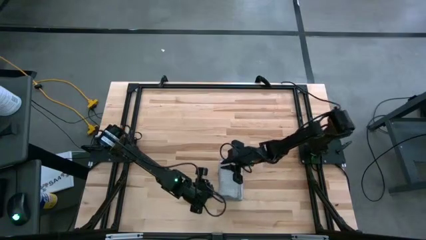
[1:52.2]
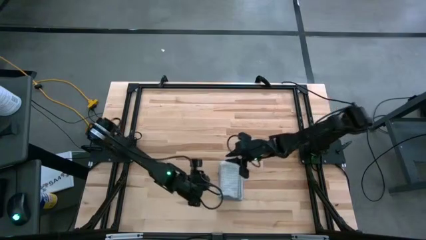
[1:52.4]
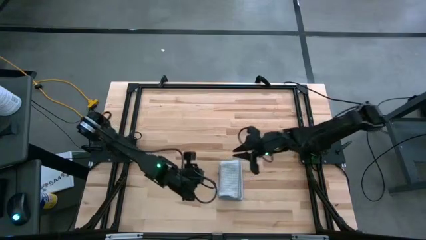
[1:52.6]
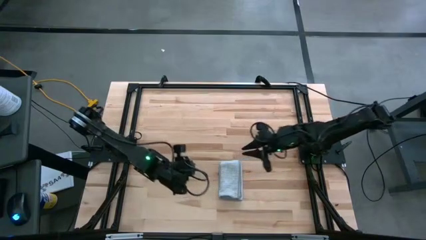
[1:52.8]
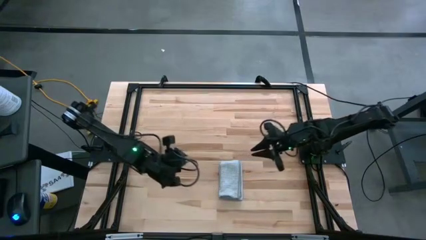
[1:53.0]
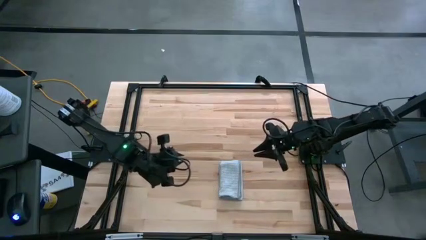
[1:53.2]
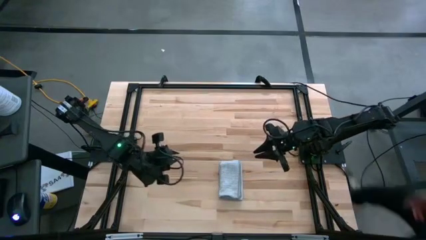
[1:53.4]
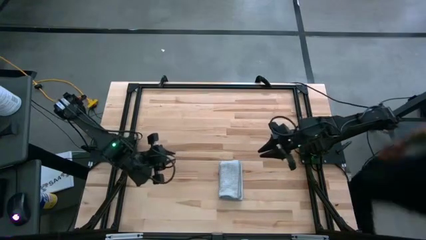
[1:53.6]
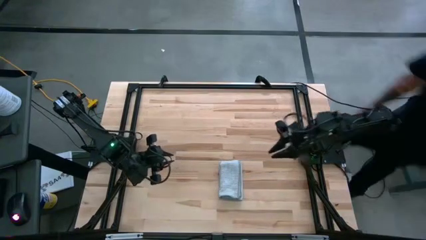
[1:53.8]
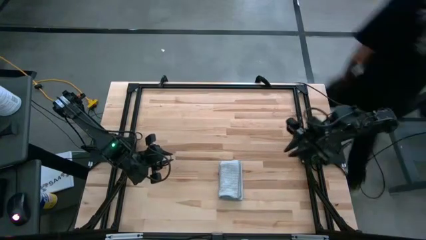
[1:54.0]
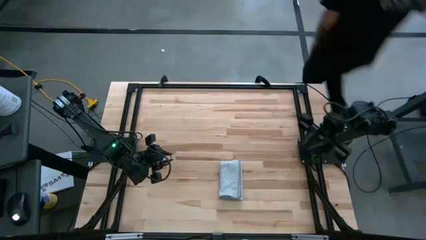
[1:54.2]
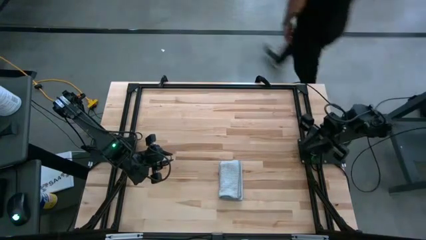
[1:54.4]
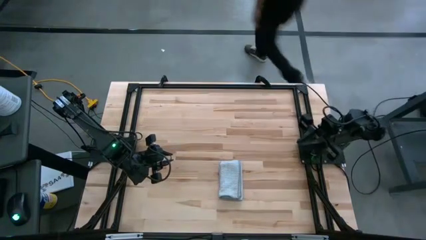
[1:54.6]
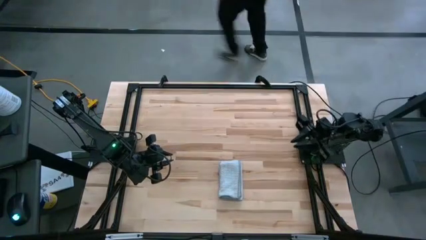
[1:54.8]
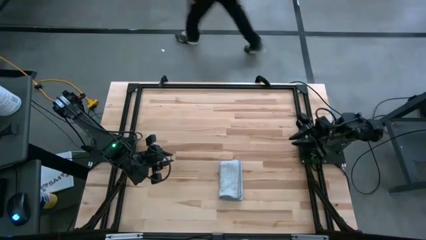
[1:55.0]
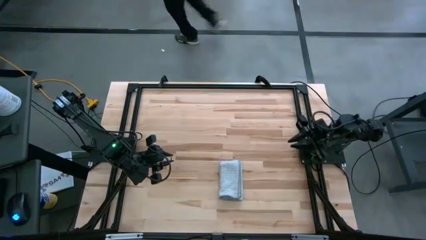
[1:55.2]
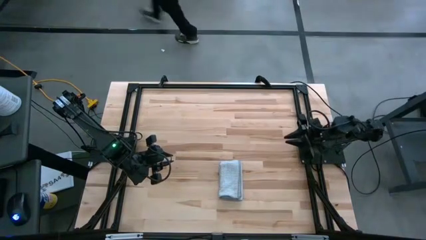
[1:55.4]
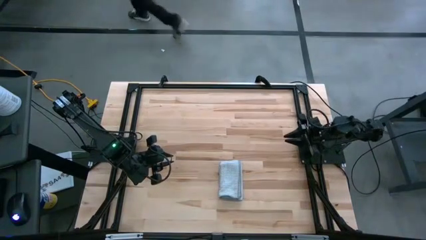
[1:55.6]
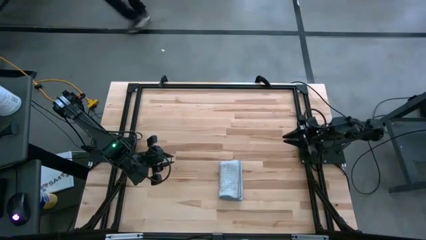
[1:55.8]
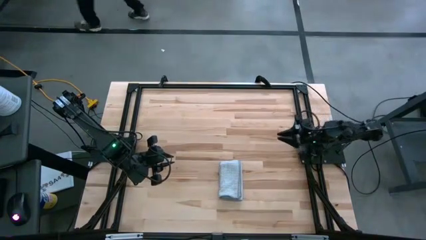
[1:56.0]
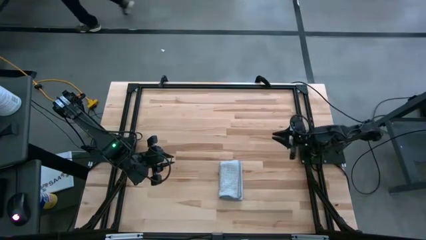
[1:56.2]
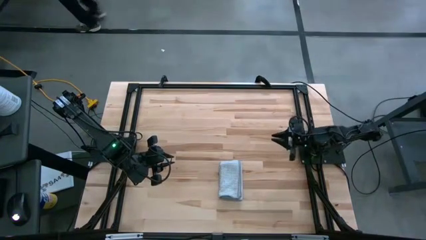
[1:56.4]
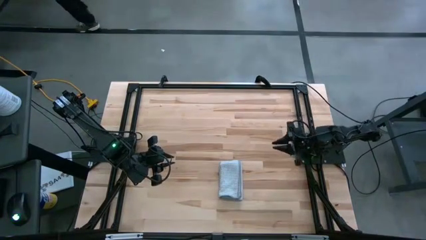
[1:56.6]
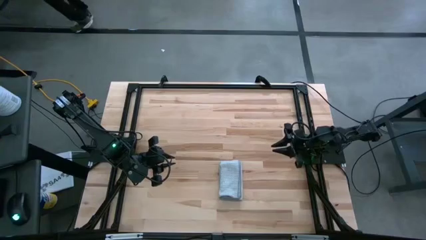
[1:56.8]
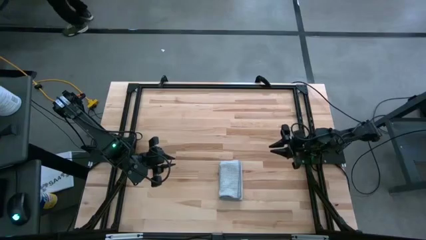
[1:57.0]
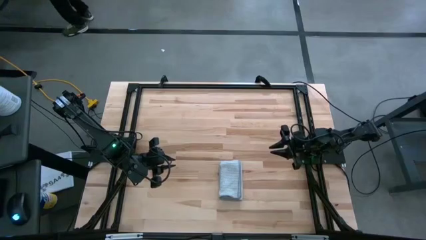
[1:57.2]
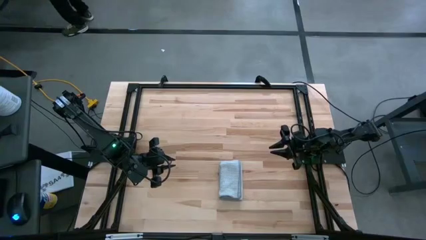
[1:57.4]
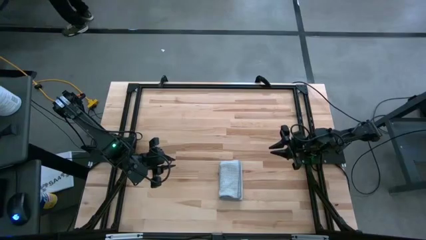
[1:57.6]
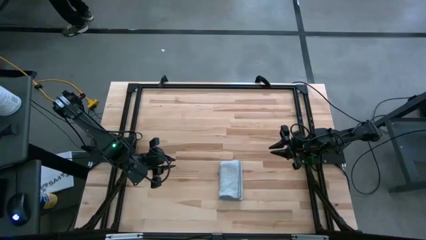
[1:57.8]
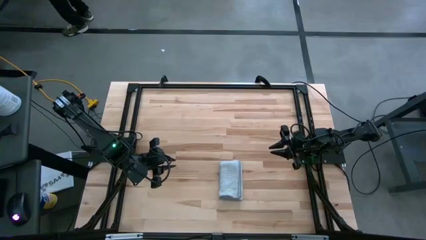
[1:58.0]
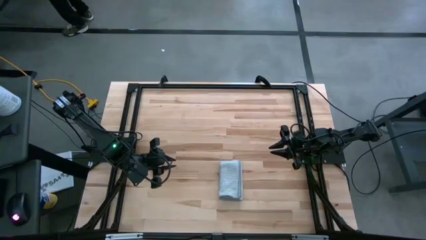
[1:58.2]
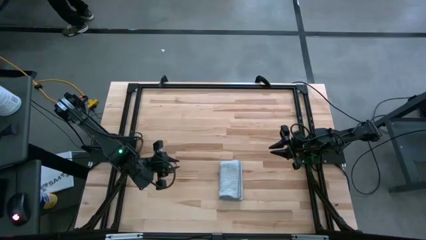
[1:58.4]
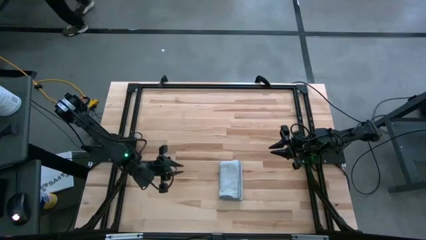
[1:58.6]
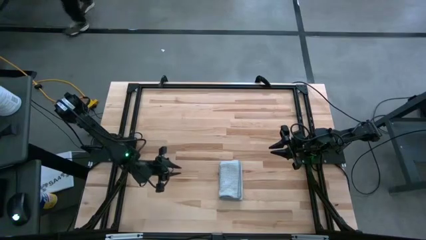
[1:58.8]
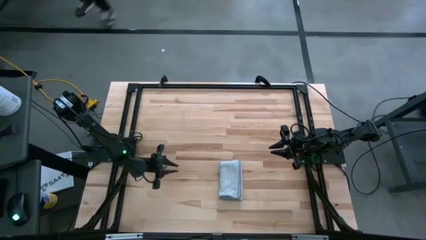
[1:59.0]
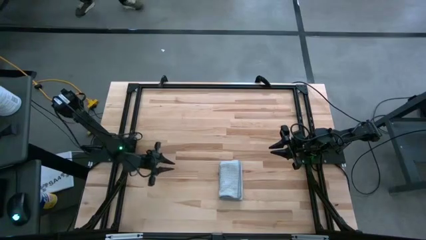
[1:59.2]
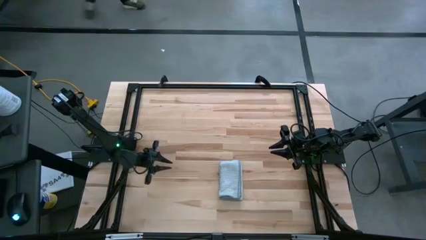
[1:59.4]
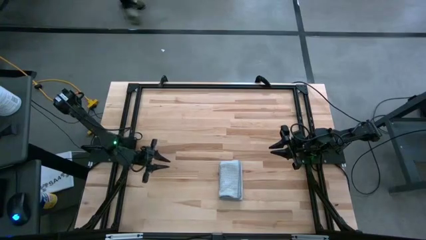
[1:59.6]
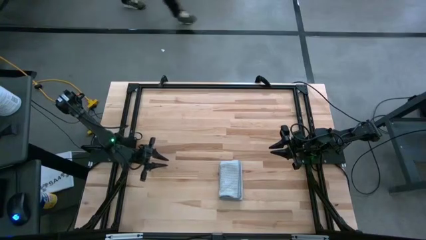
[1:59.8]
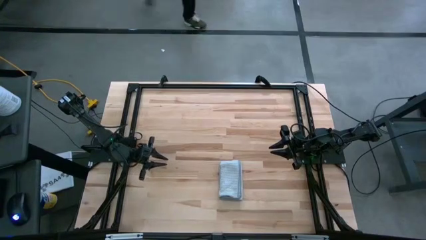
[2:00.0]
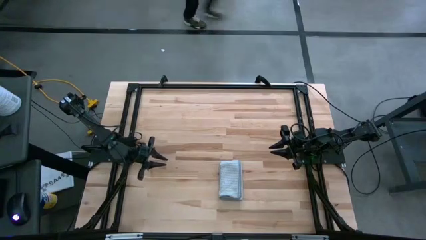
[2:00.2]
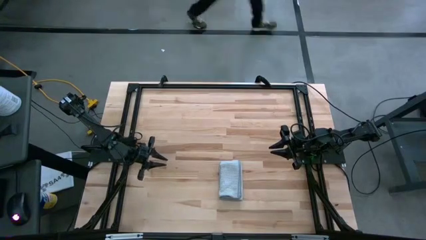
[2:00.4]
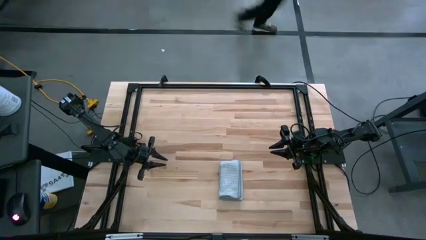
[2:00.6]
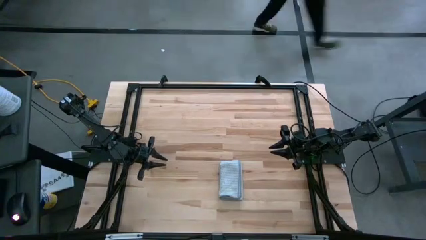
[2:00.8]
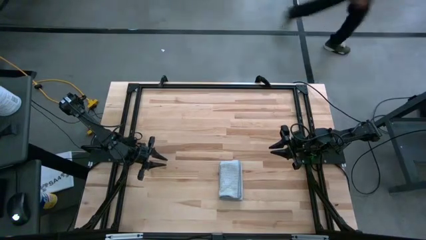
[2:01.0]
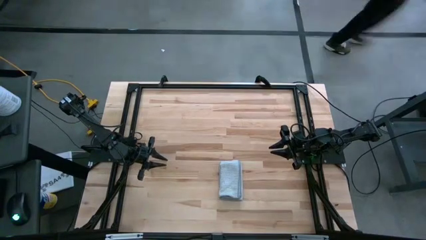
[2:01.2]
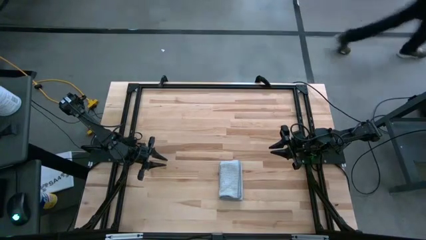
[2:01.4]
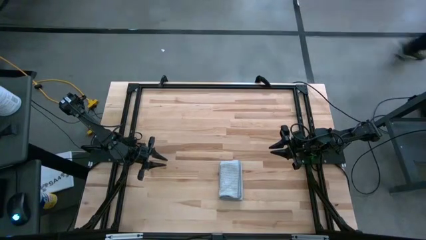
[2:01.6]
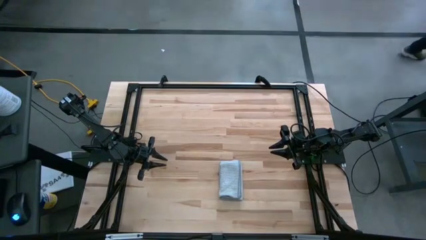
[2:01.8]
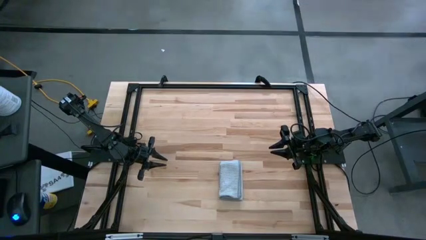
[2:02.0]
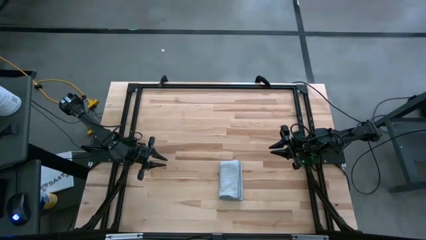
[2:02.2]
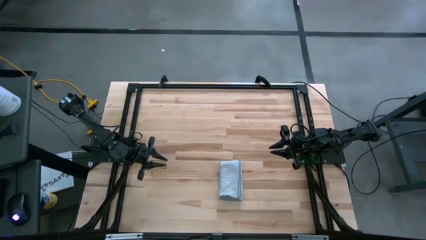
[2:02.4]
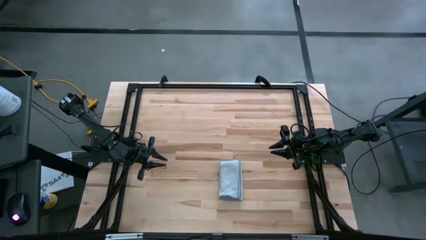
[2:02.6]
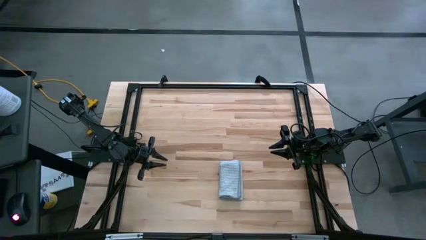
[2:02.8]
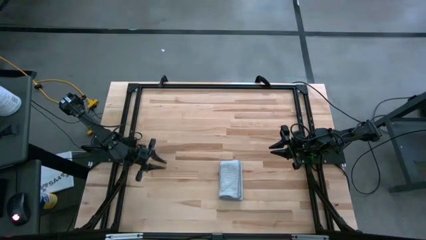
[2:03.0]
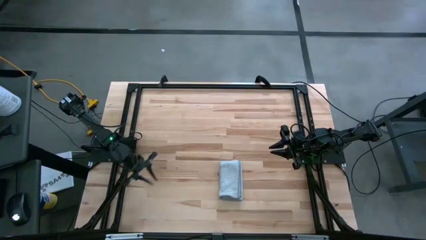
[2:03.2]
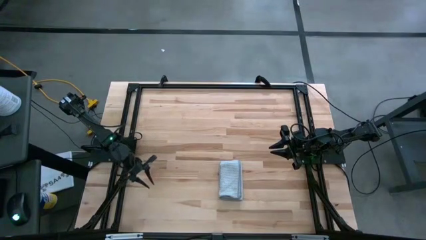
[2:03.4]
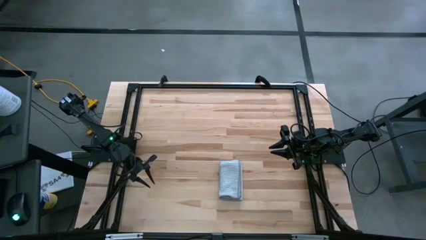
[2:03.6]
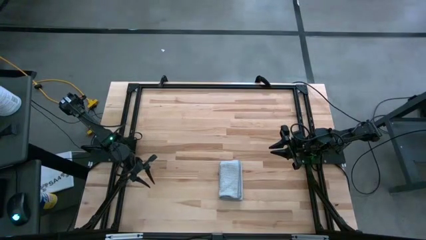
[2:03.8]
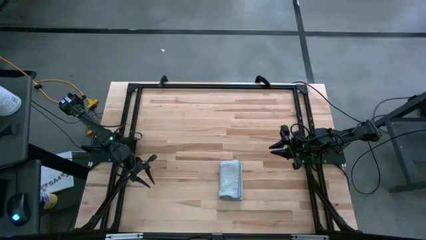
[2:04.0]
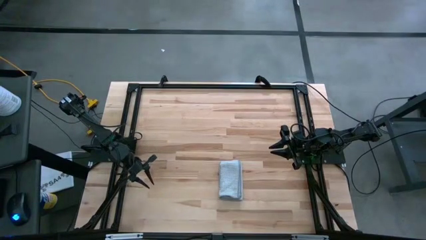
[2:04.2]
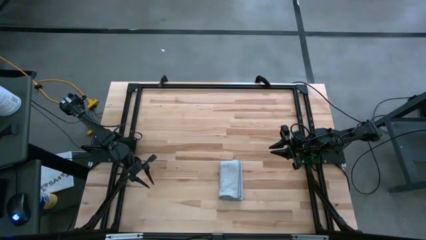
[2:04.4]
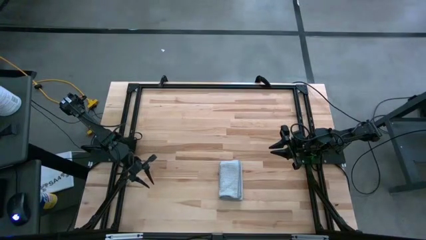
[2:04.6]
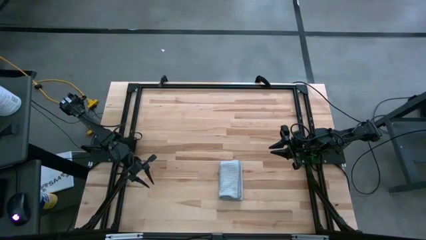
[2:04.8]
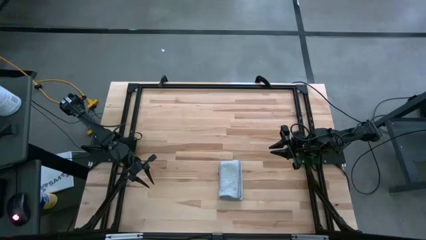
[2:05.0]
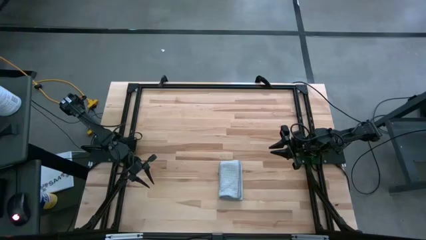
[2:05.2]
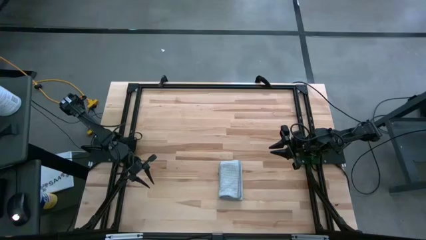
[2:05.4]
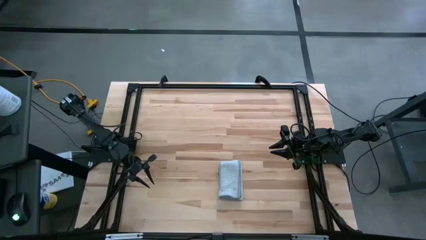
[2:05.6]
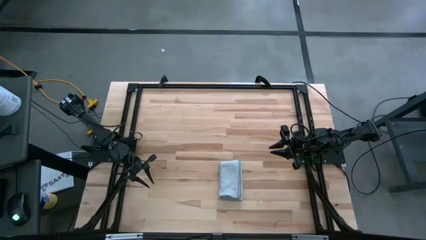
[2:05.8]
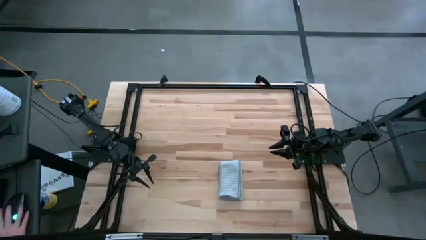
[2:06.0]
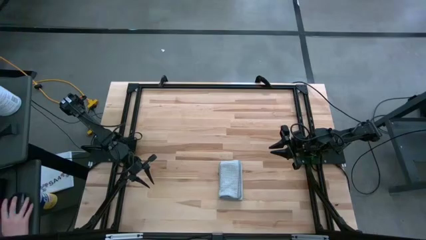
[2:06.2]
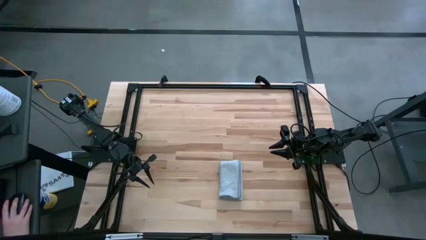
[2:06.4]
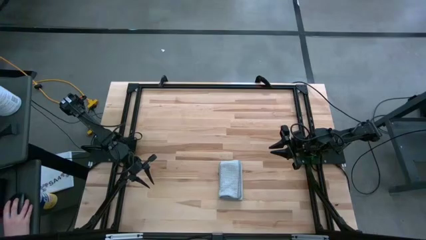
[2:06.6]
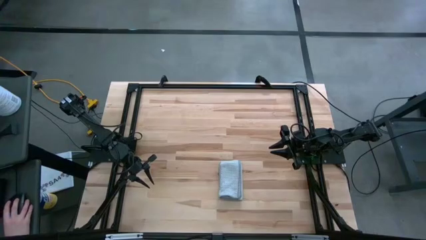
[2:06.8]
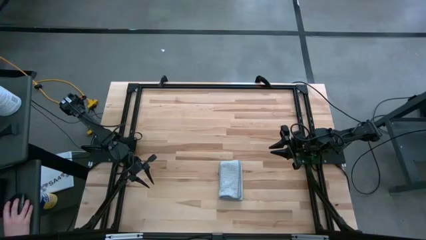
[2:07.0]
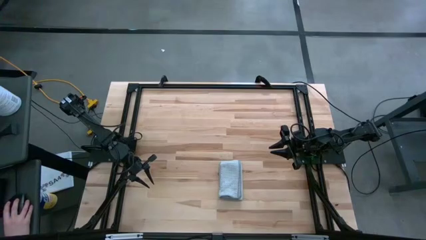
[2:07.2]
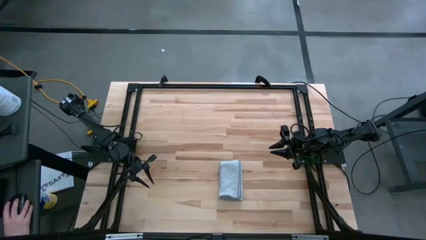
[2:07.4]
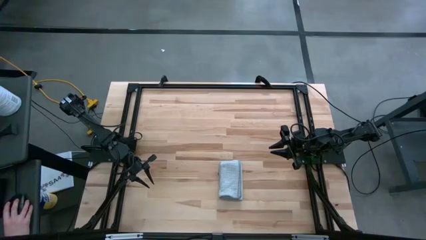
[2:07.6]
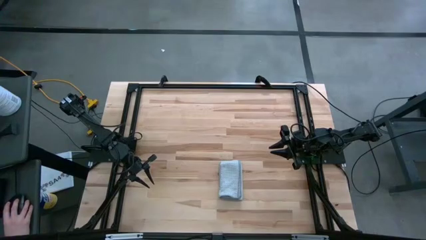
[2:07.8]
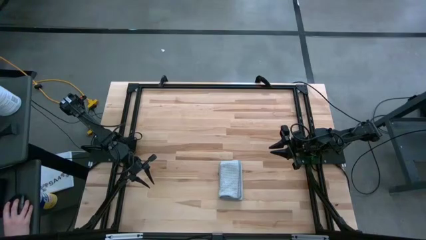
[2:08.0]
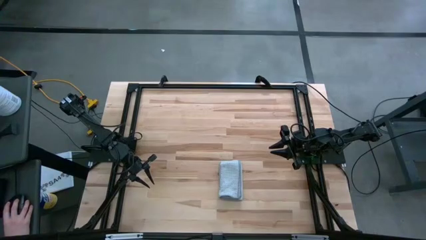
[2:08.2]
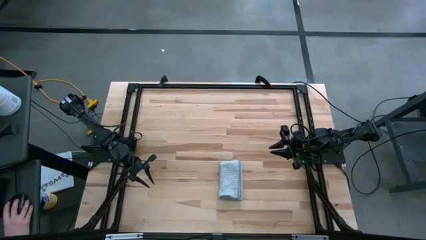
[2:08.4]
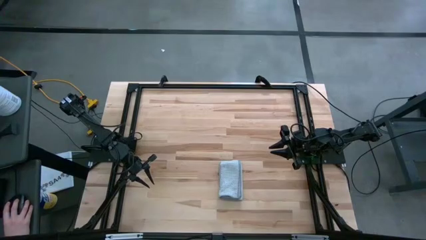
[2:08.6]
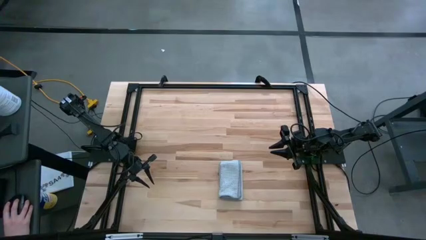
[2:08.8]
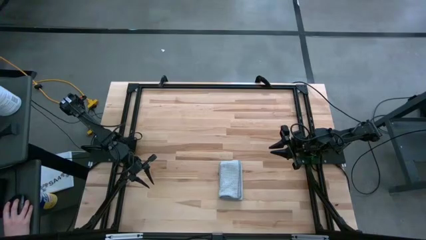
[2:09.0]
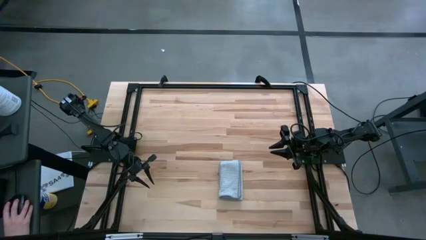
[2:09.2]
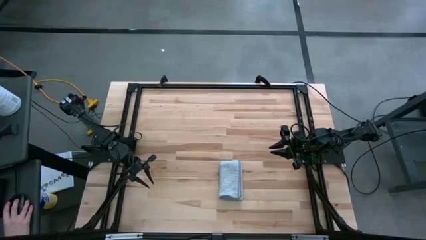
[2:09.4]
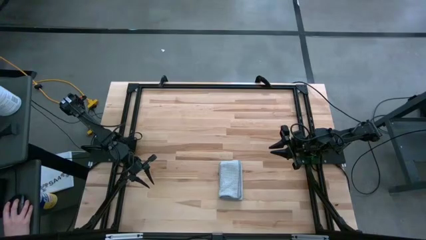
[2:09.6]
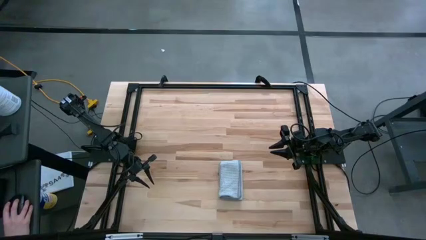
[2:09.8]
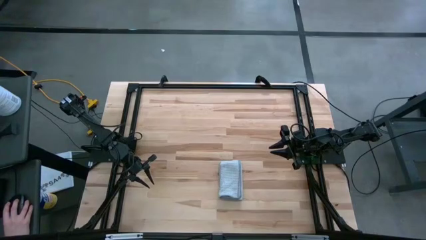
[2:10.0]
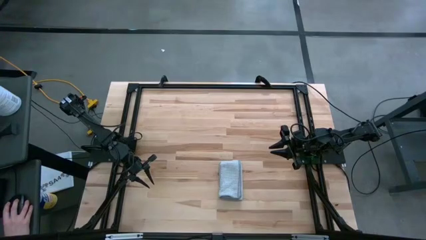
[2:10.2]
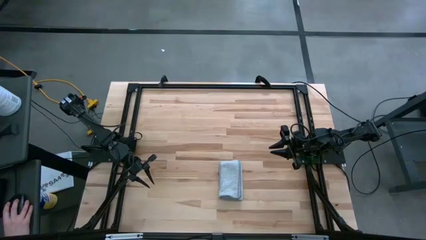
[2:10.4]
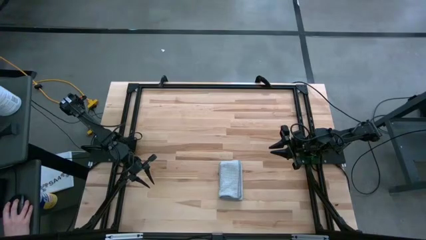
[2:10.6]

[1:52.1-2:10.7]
Task: Fold microfiber towels
Return to Home Position
